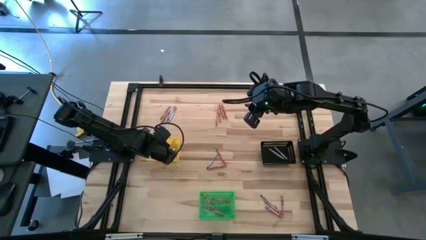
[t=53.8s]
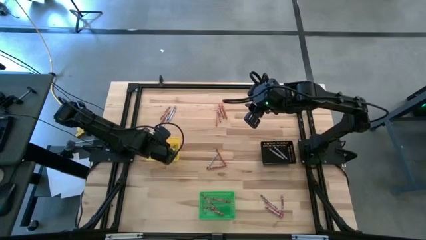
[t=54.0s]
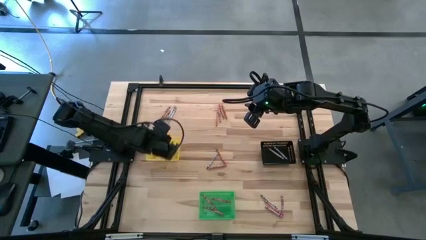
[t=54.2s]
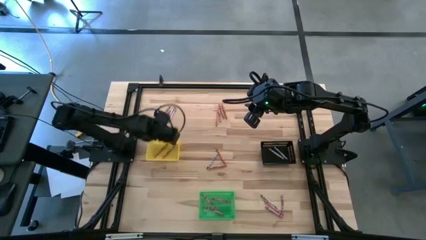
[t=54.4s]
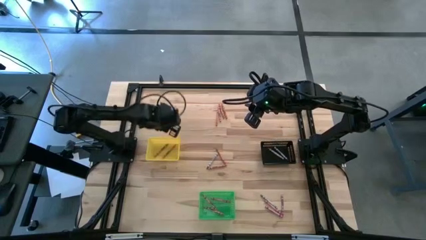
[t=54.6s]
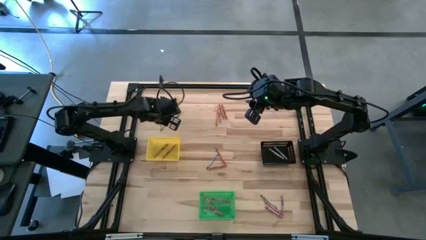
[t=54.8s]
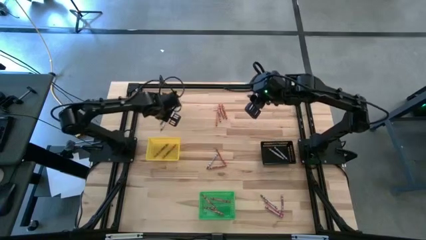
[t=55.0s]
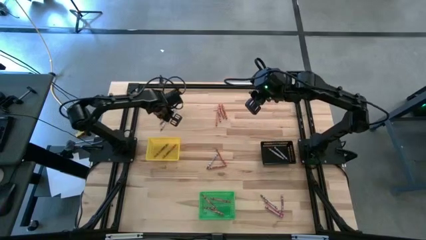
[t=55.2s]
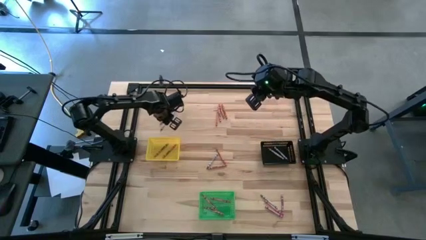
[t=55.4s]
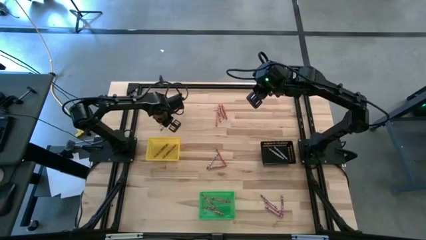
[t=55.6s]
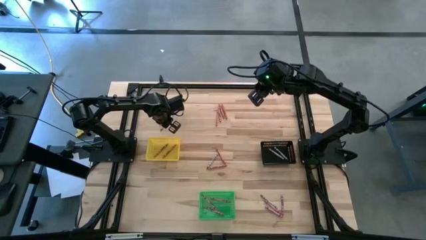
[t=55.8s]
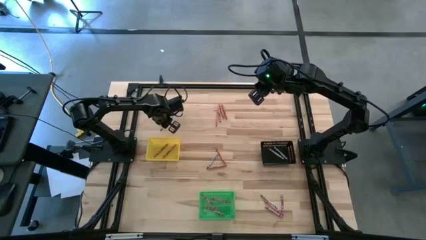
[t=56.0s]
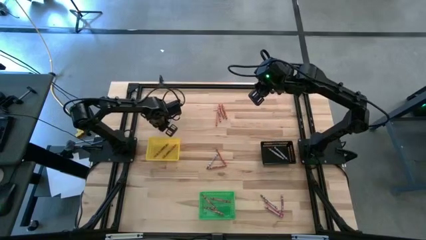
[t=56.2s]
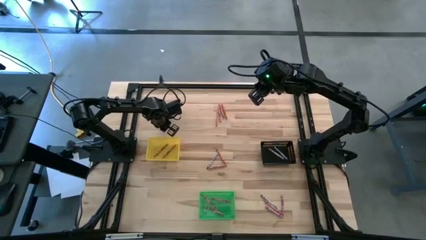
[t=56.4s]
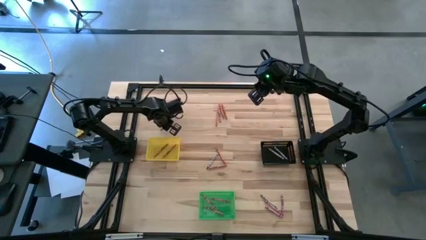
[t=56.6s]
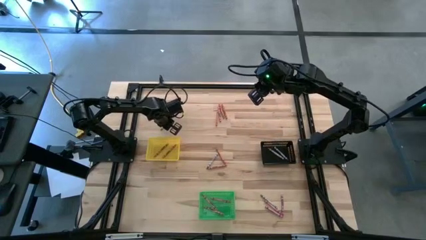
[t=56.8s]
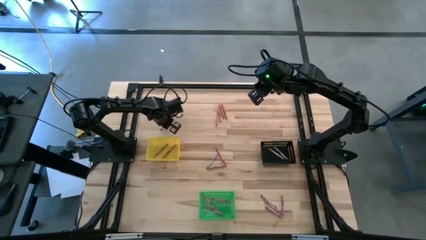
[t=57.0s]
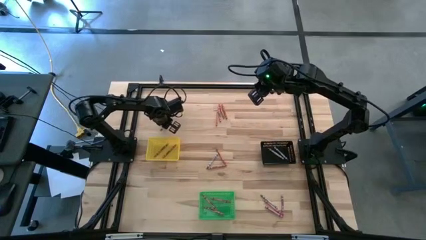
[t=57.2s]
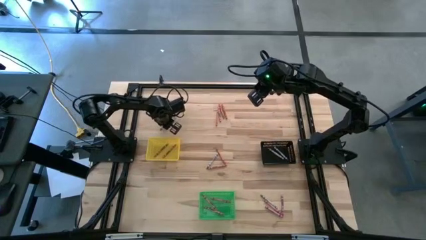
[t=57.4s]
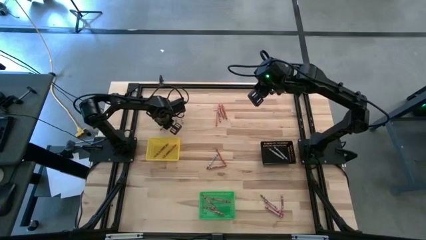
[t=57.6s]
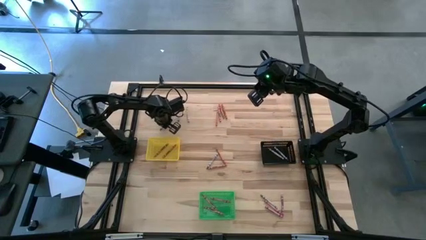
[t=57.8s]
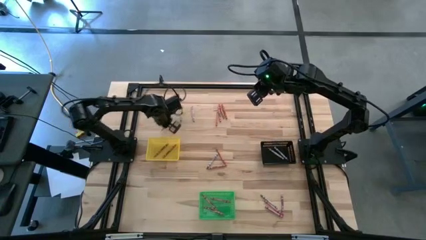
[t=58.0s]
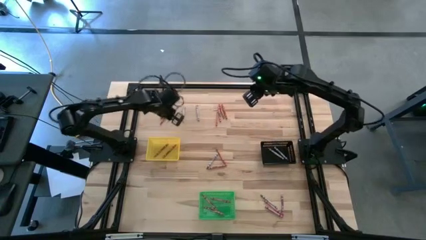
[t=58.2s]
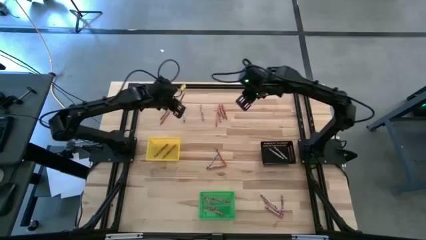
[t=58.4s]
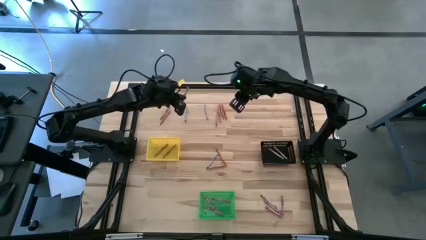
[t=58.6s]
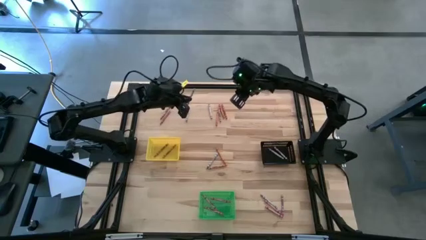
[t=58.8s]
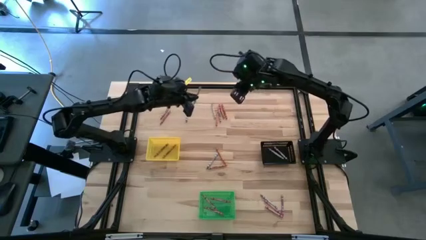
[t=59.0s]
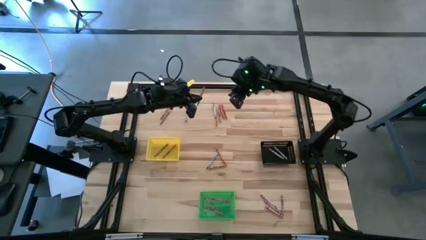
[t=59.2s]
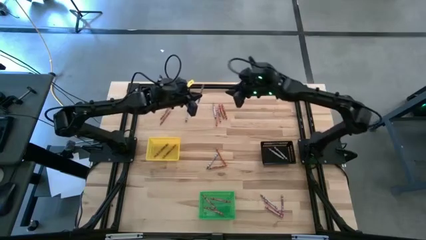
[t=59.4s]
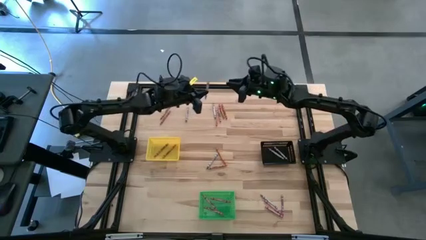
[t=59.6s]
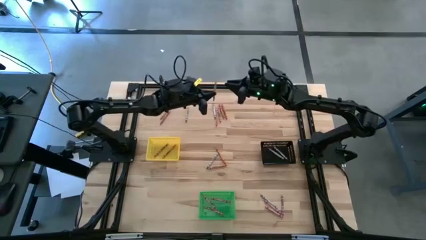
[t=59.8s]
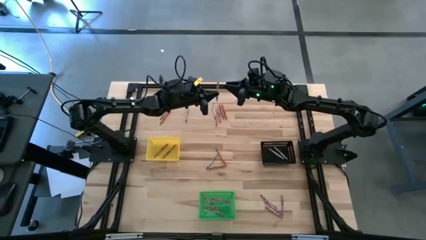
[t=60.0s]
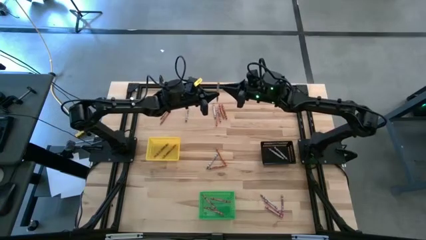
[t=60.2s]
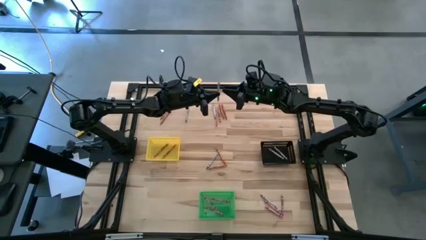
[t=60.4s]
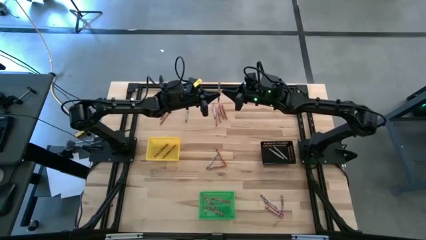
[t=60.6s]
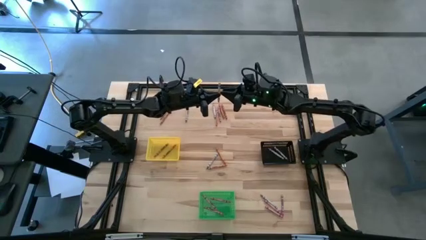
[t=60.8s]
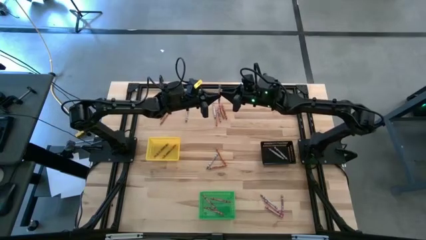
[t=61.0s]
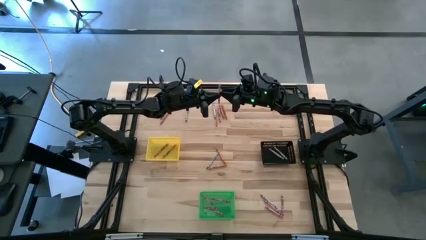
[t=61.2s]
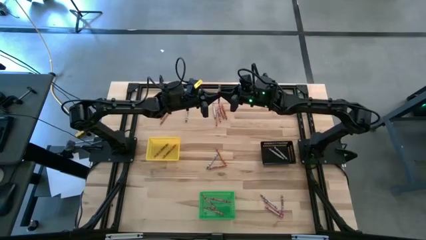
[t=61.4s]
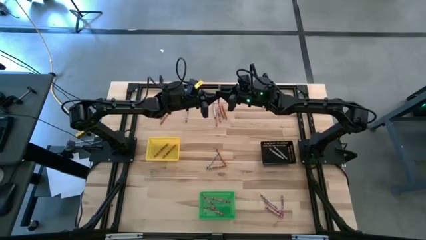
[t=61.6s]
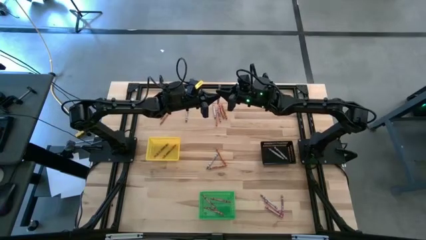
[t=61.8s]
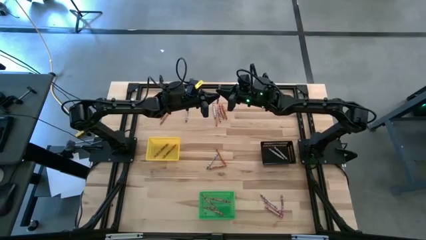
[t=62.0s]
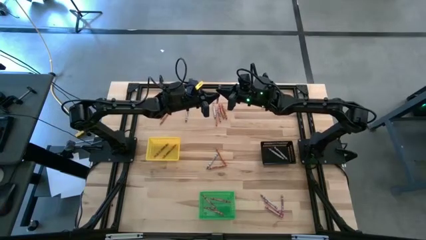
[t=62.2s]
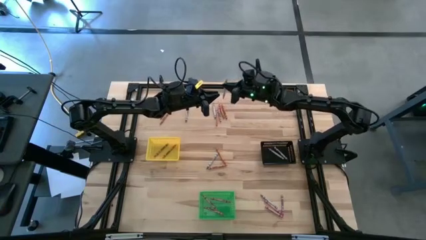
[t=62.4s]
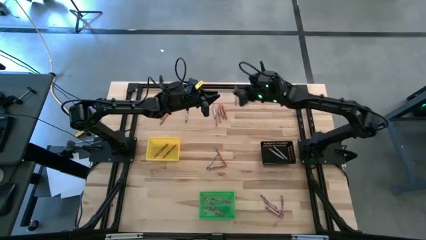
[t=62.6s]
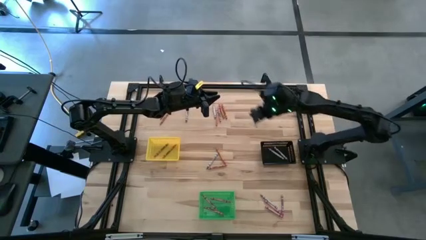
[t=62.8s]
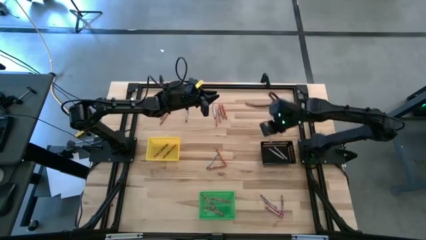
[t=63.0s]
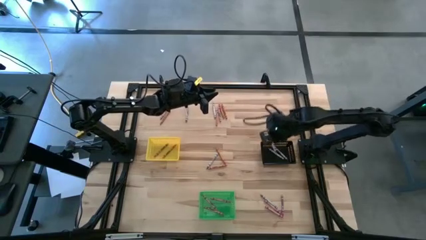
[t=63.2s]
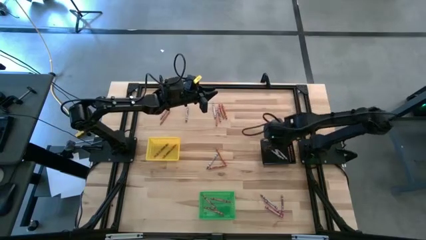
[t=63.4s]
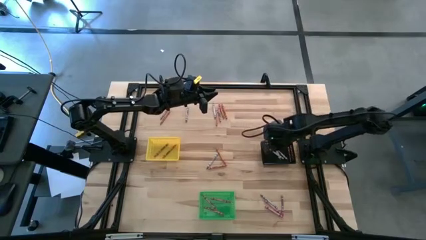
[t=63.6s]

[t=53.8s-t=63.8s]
Task: Sort crayons
Put the gray crayon into the black bin

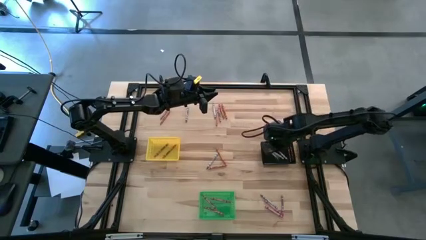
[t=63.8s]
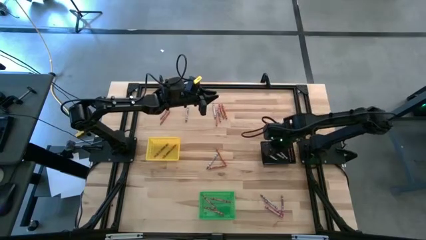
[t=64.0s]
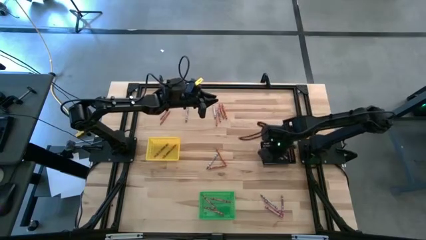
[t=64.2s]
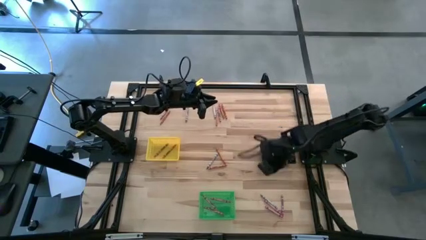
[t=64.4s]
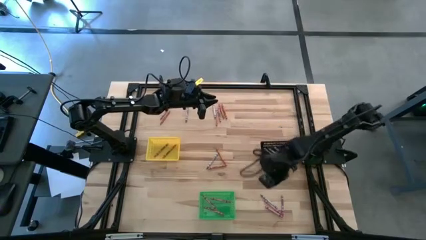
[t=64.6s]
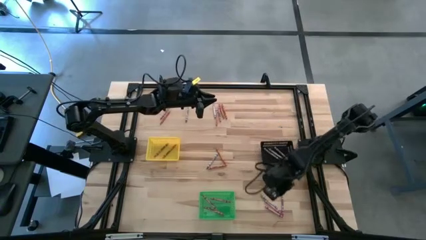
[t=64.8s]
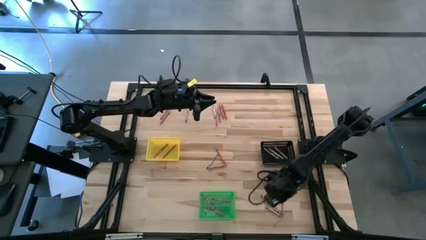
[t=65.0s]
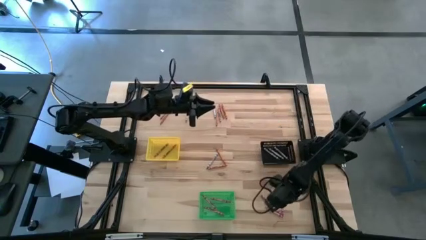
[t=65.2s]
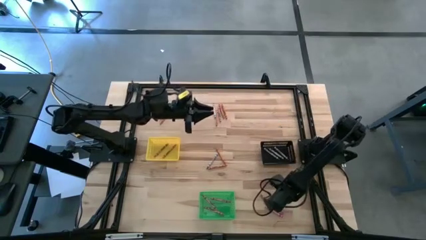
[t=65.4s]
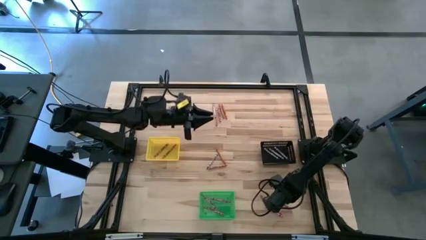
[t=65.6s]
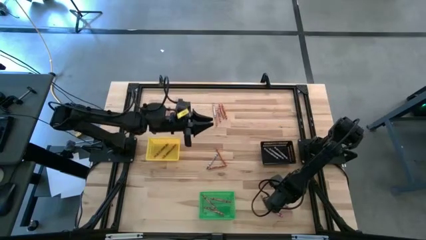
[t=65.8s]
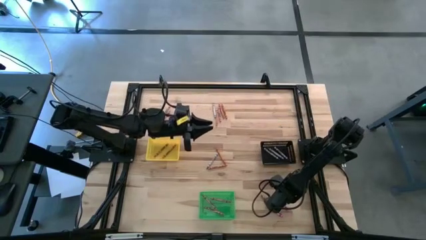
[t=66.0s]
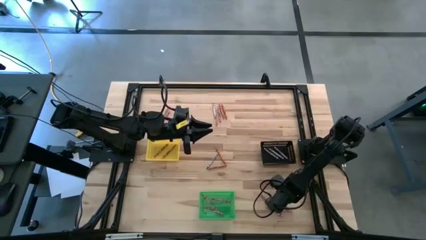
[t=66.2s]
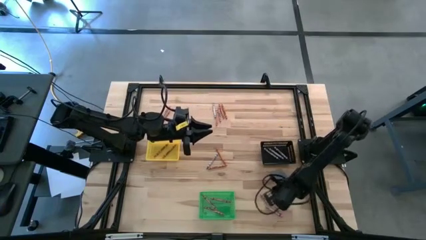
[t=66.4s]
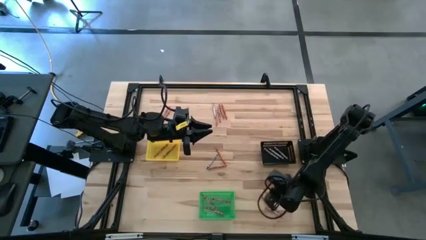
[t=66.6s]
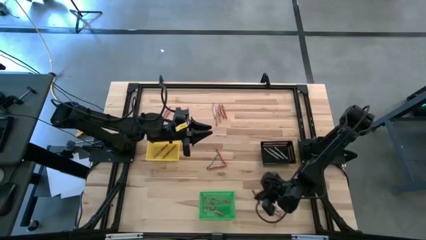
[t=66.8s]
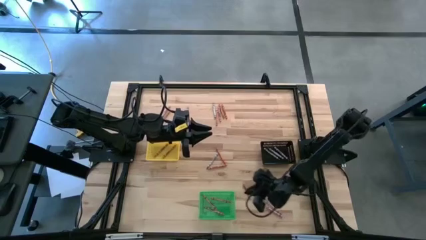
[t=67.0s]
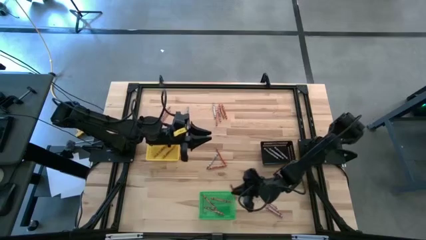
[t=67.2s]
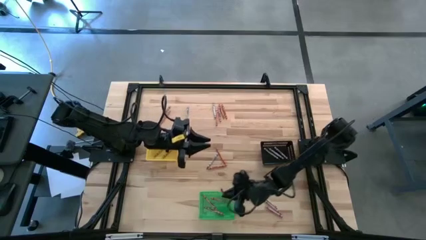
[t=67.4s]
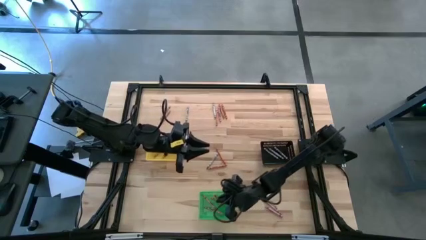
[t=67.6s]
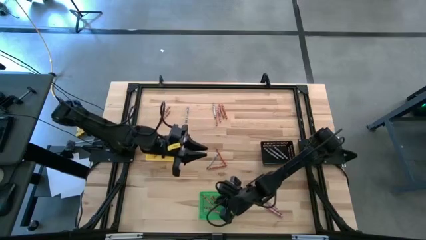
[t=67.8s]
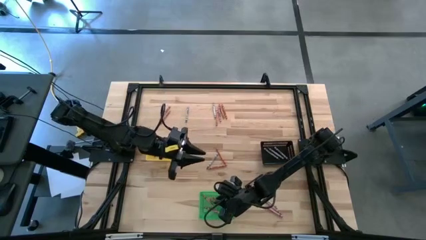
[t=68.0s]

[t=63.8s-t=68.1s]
Put the pink crayon into the green bin

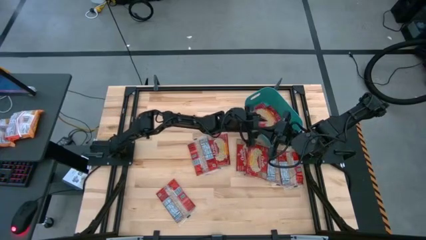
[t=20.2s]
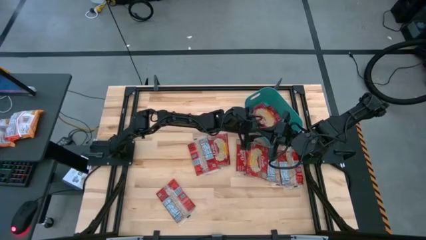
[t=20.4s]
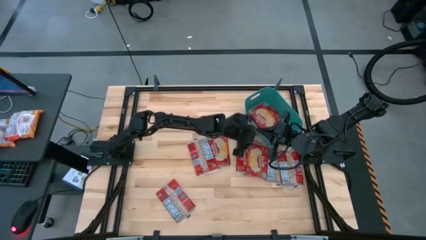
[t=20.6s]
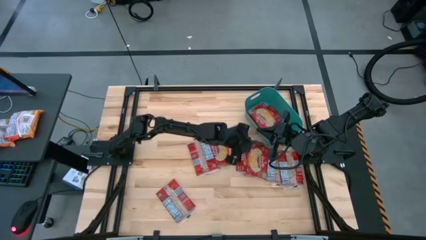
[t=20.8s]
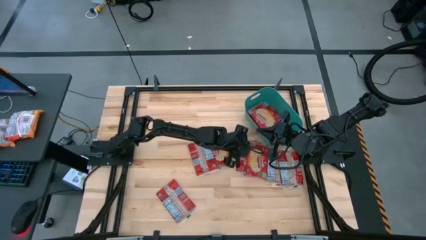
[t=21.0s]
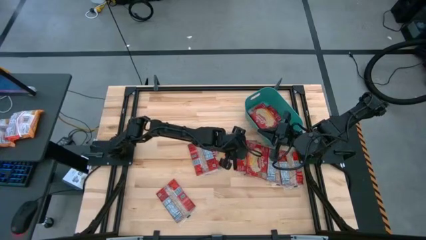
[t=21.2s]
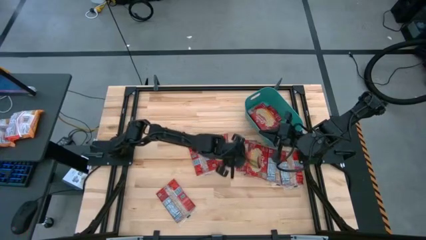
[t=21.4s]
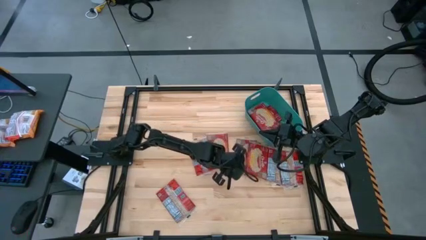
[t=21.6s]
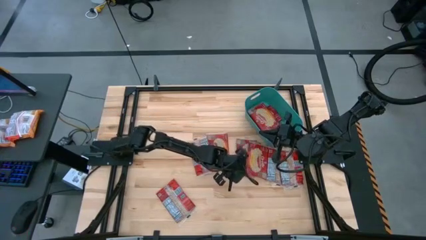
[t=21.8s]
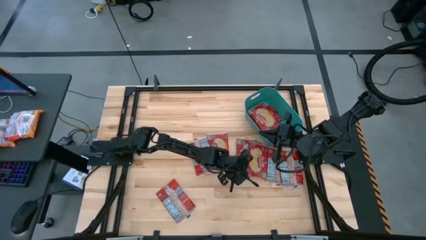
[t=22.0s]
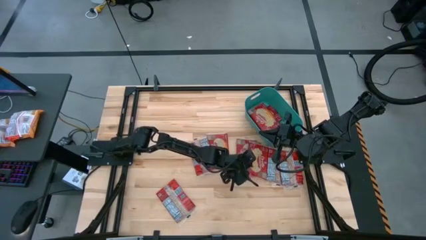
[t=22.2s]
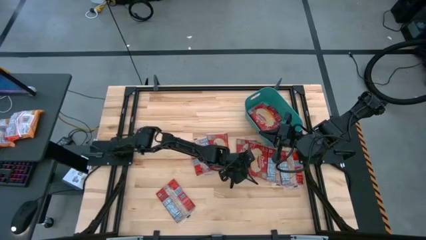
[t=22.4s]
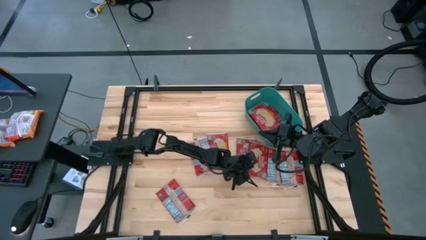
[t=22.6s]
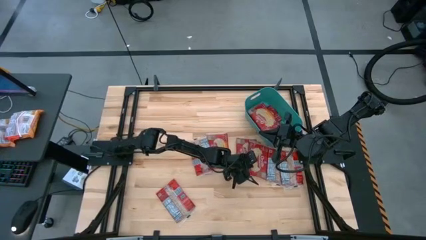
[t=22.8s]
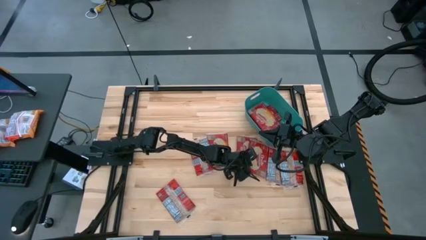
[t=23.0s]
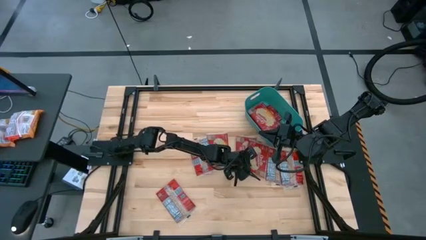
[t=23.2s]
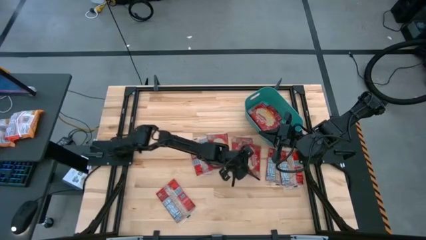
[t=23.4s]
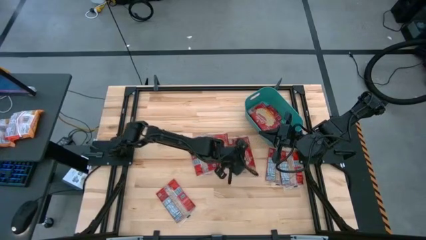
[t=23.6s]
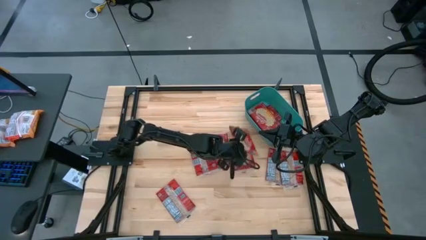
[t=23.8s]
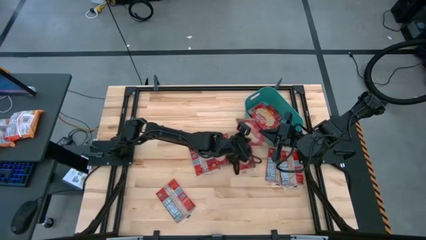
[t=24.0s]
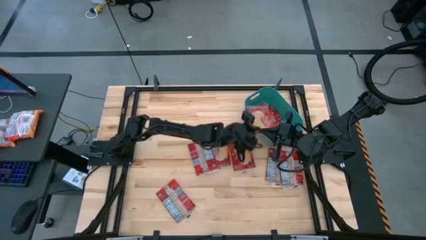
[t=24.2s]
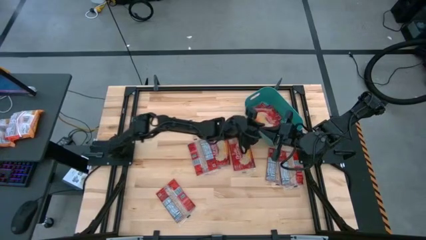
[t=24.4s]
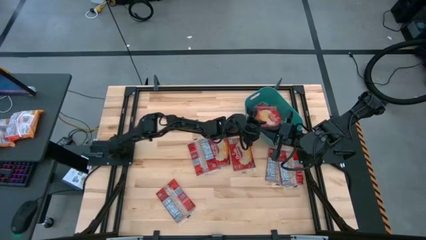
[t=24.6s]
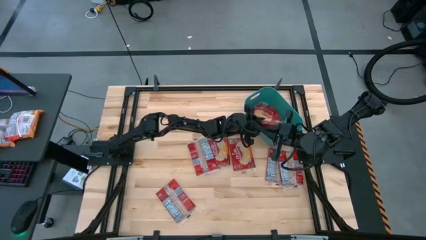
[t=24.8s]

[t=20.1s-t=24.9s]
Task: Sort popcorn bags into baskets
Put the red popcorn bag into the green bin
